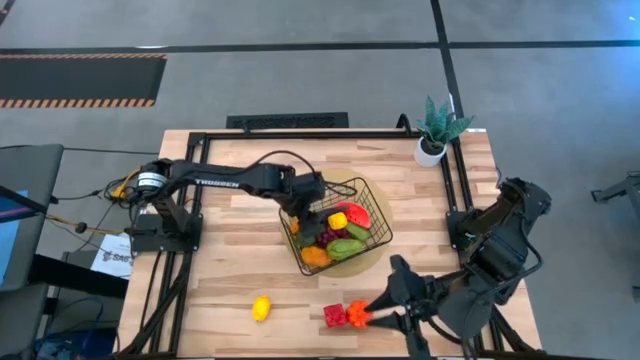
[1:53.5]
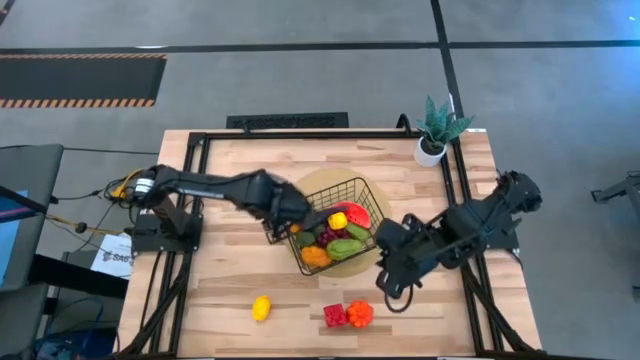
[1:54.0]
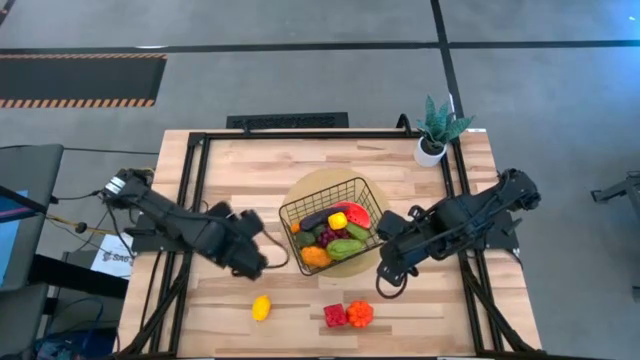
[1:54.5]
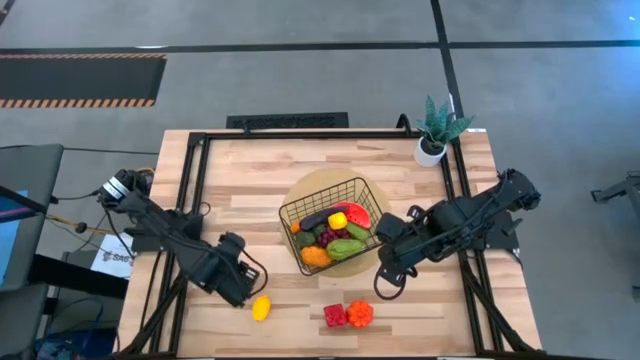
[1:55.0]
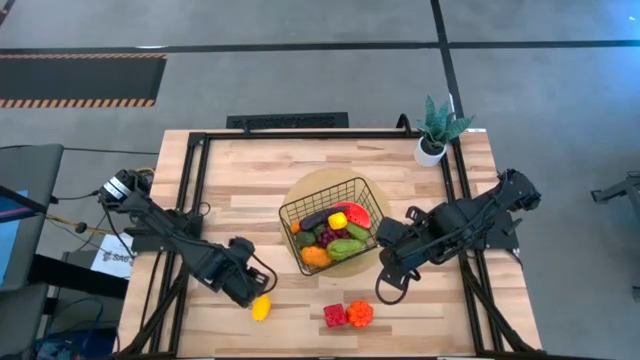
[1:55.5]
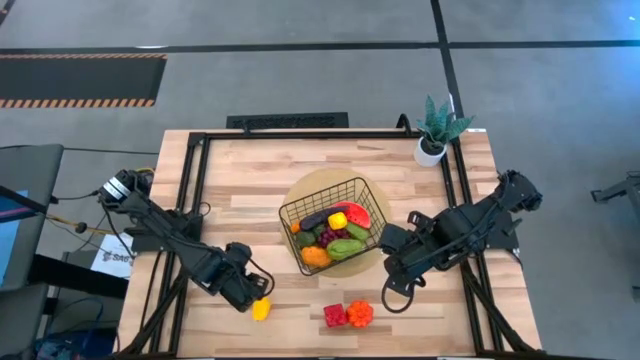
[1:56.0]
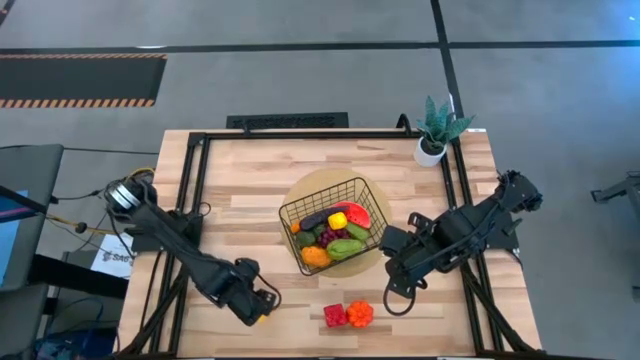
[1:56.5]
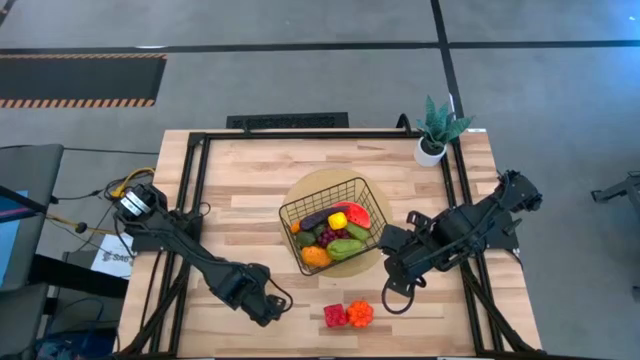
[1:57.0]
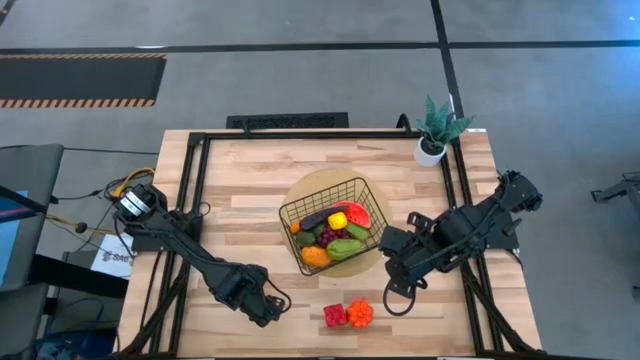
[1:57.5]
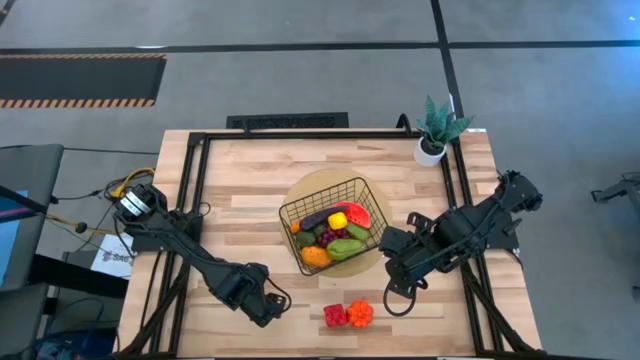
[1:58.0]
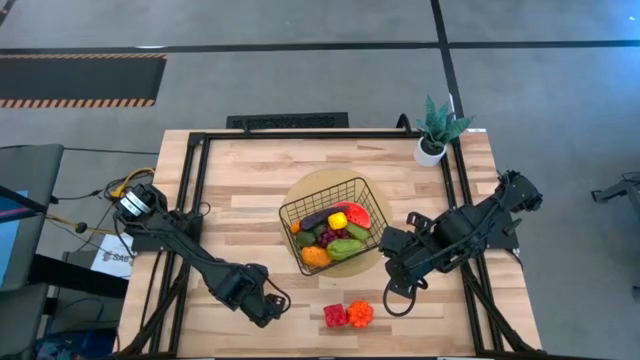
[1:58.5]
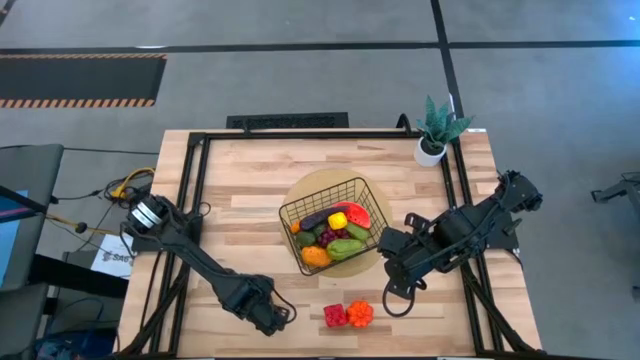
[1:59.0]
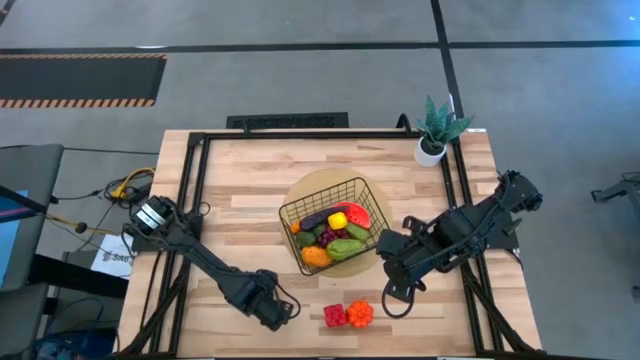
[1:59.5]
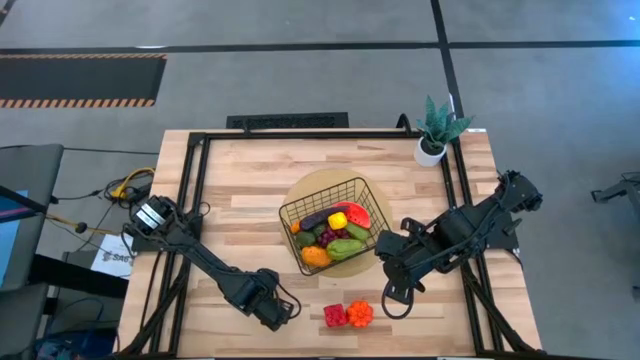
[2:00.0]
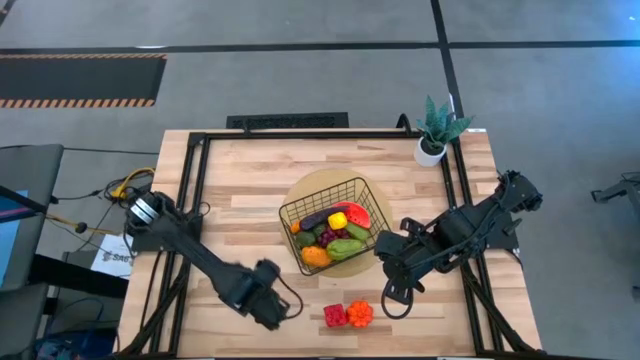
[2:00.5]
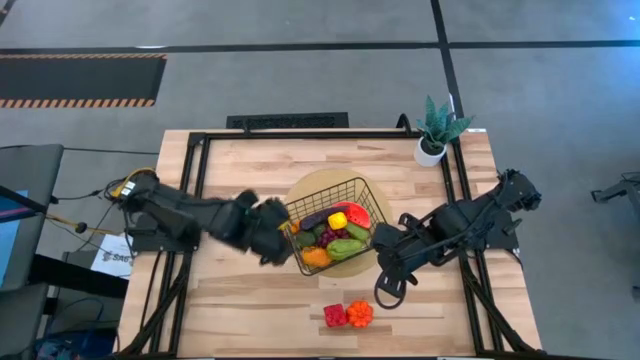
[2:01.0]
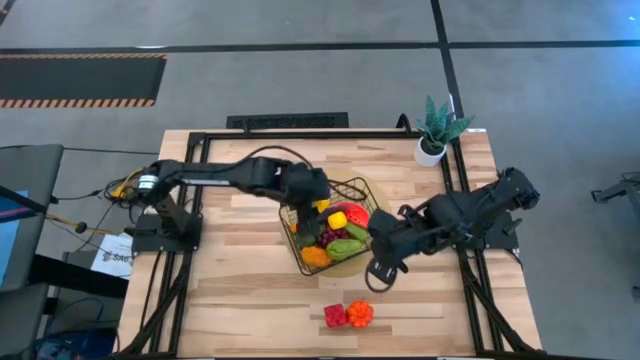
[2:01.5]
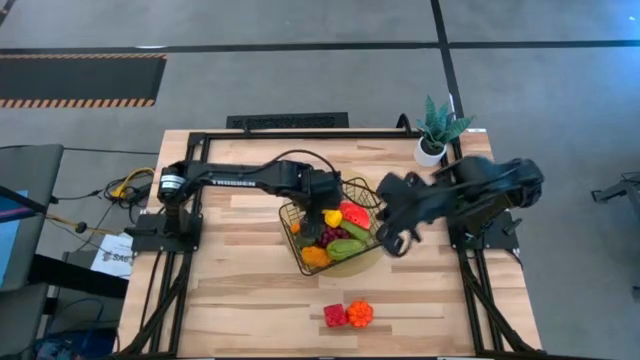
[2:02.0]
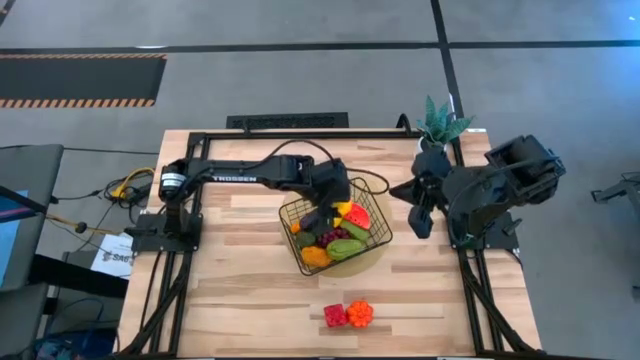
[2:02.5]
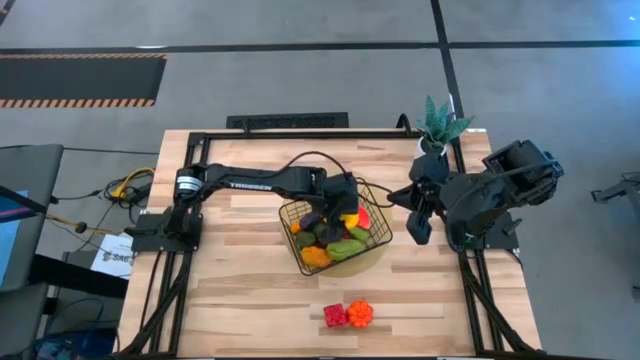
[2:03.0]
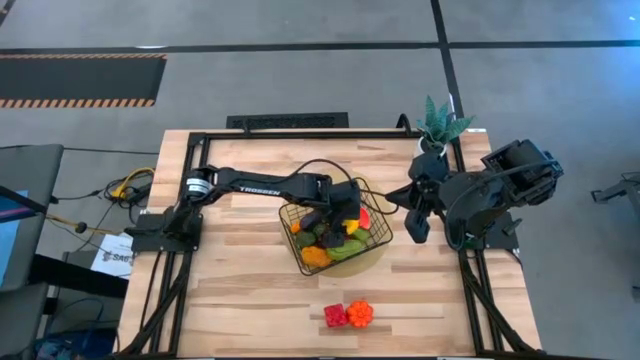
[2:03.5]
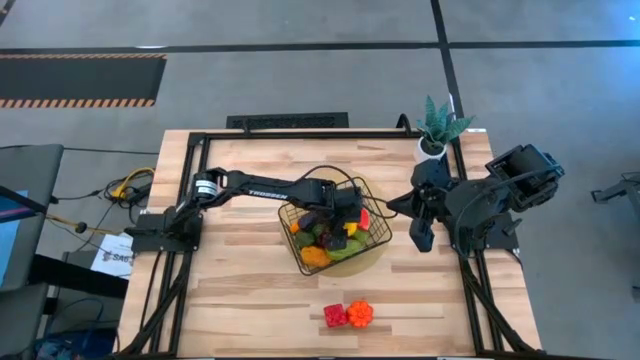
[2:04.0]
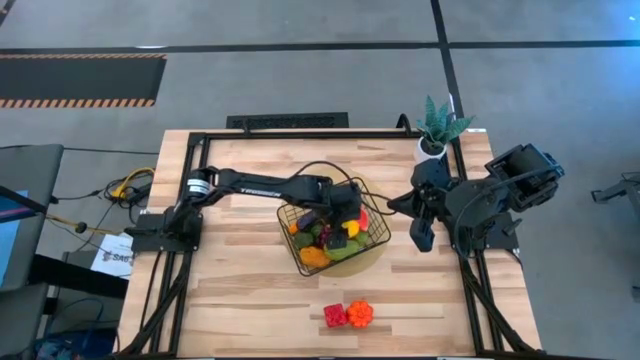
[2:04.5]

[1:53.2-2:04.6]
Task: Build produce basket
Put the yellow lemon into the wire basket

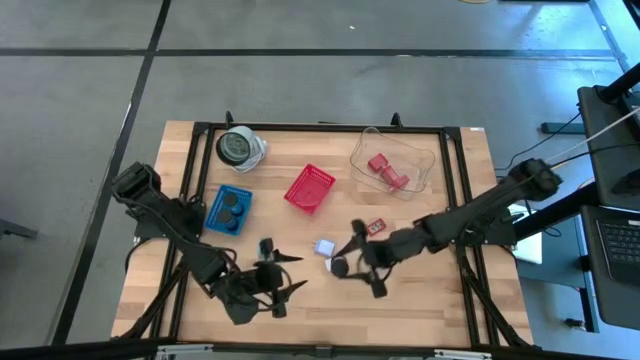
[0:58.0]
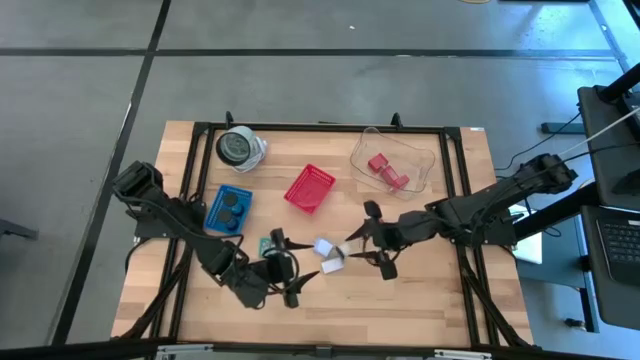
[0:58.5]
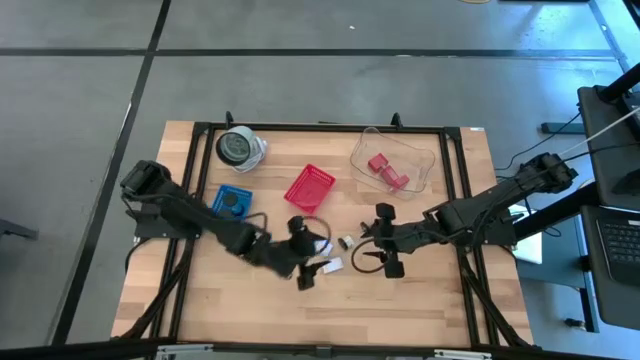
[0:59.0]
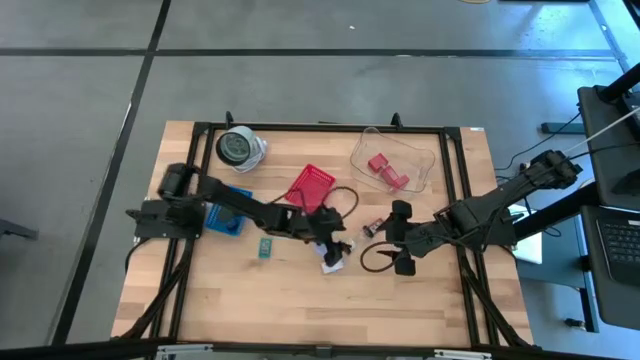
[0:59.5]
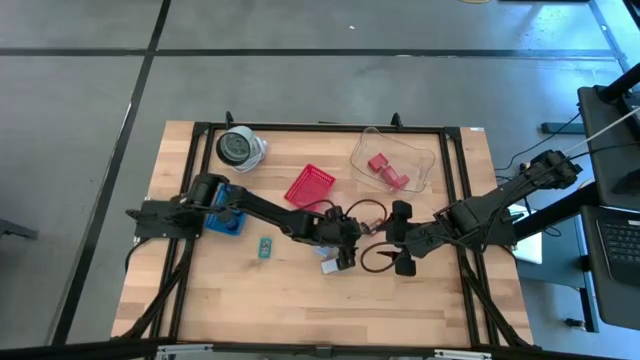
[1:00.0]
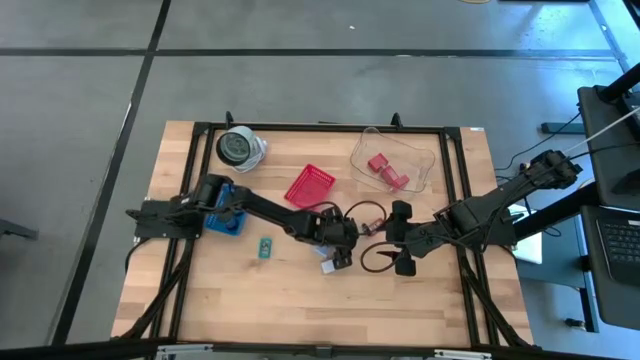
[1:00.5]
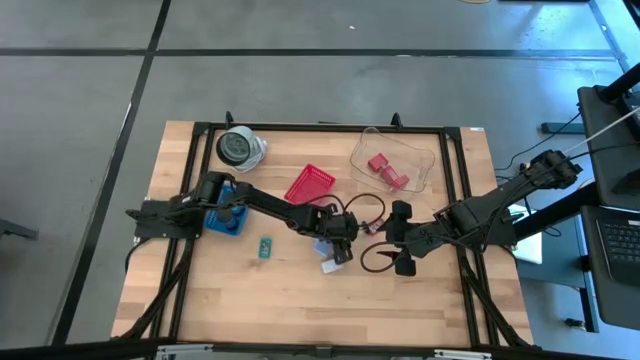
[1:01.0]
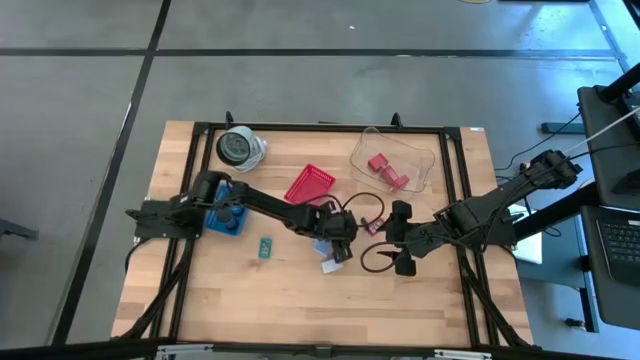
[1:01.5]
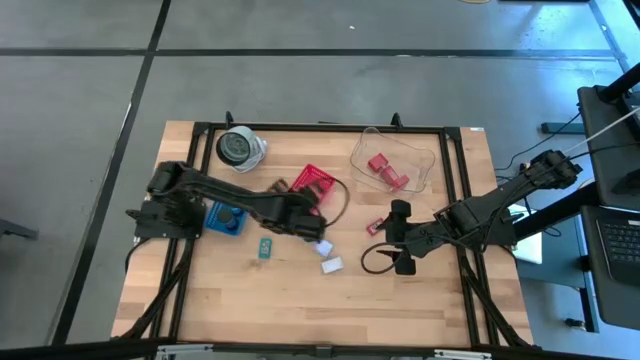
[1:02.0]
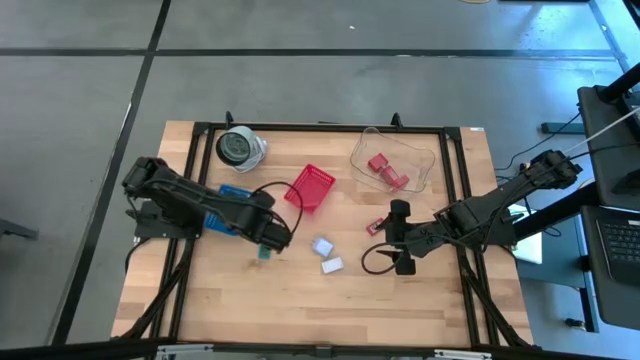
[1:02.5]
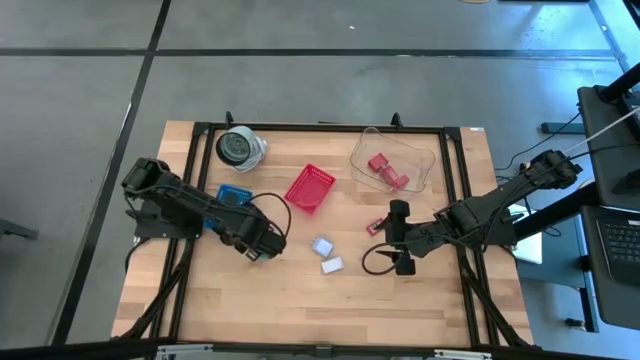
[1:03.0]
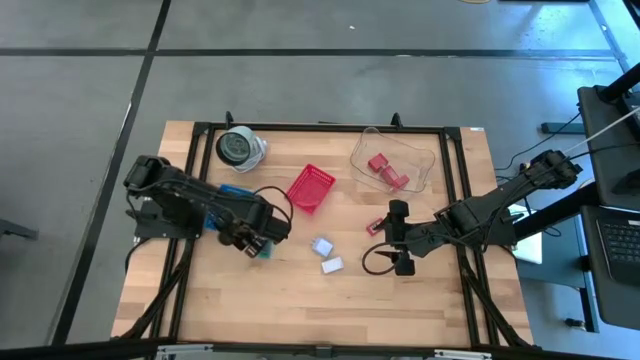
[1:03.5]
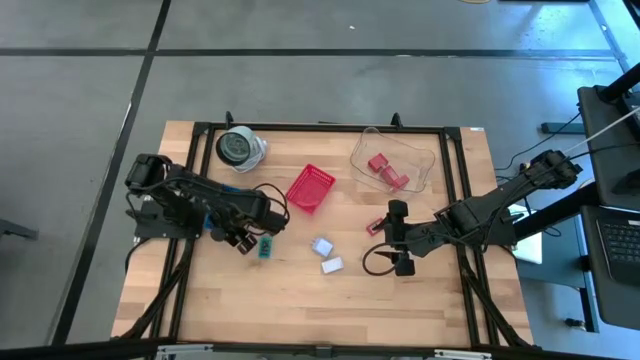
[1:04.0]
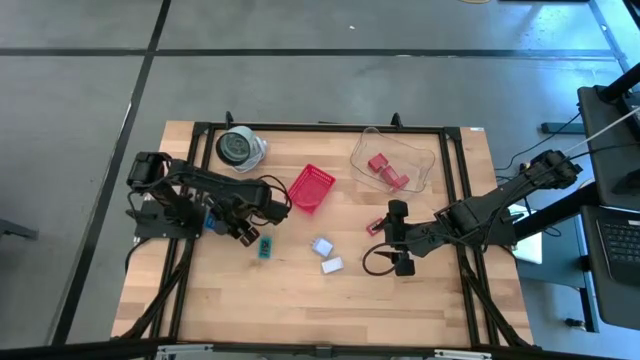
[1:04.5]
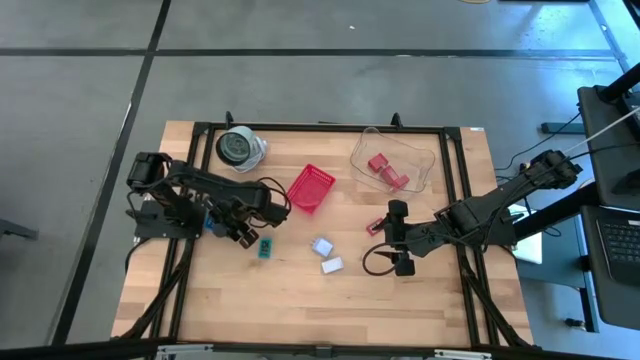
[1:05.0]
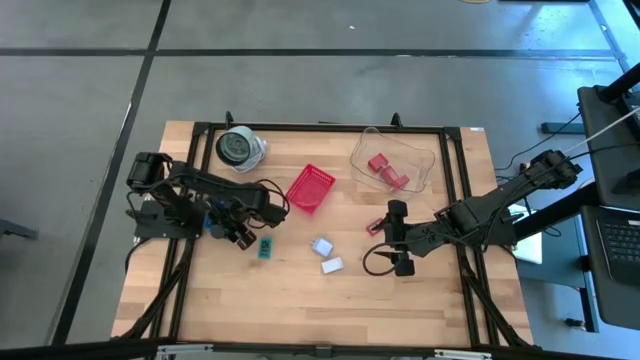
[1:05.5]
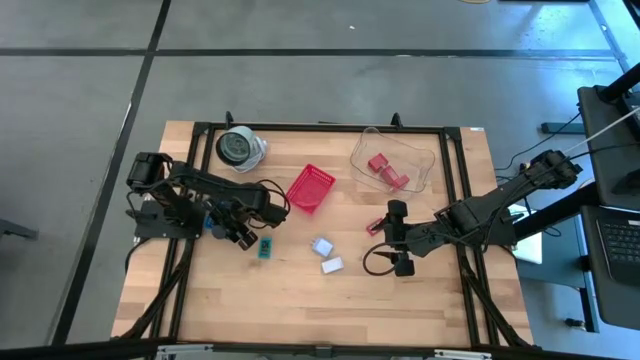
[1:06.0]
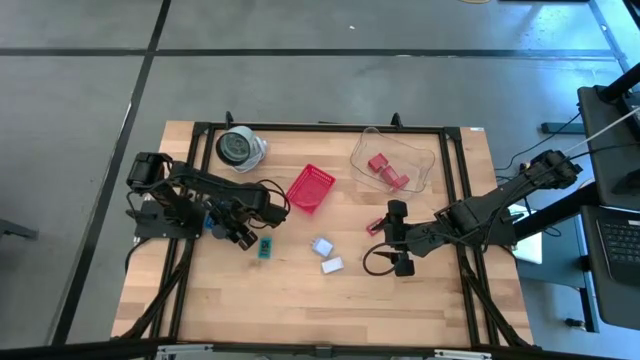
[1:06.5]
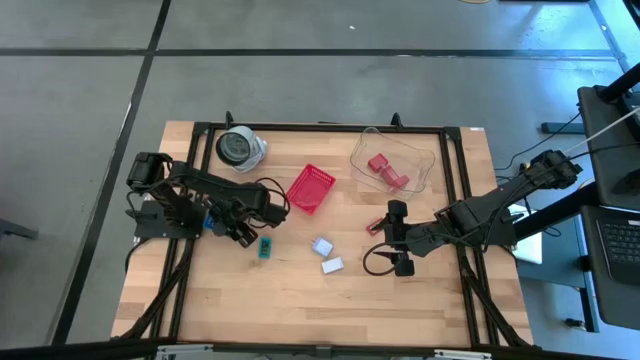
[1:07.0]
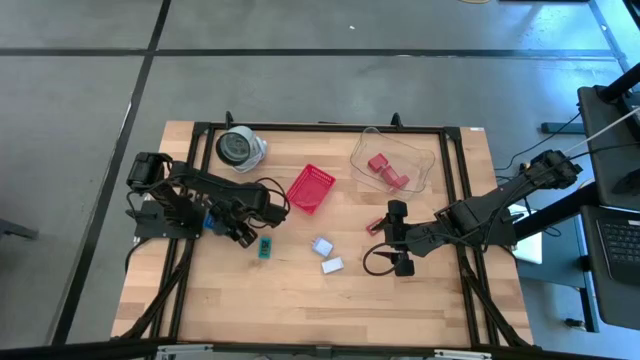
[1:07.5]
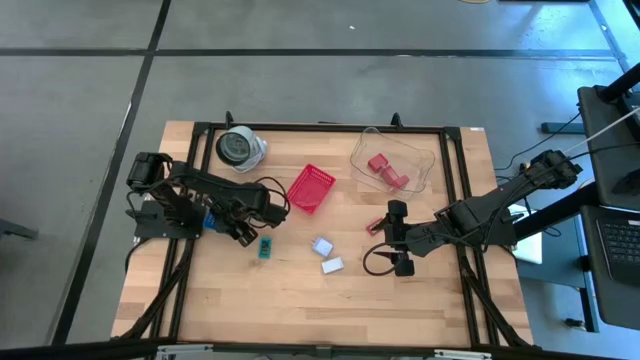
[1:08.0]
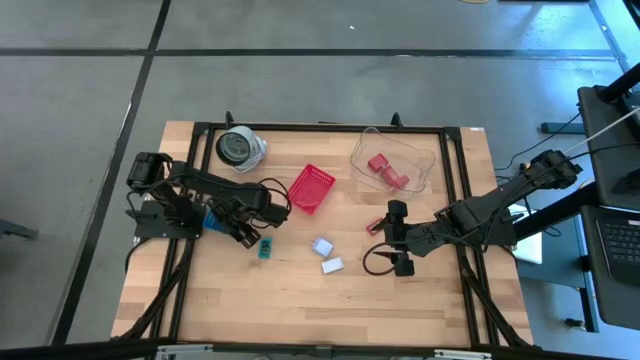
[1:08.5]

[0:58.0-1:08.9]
Task: Pick & Place Office items
Put the white hourglass into the blue bin
